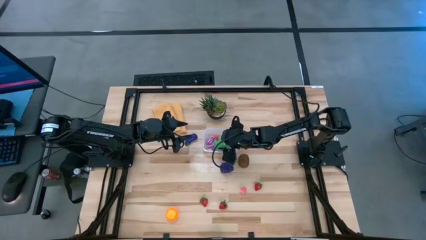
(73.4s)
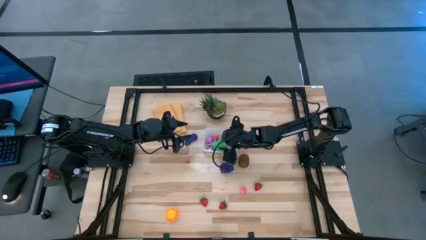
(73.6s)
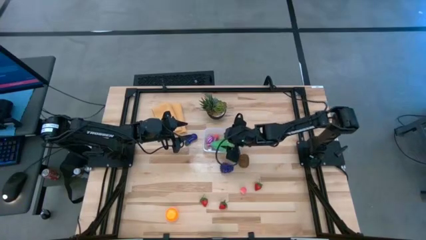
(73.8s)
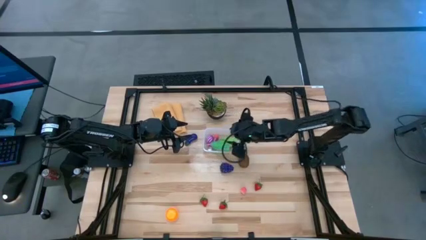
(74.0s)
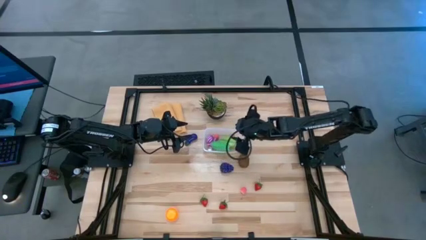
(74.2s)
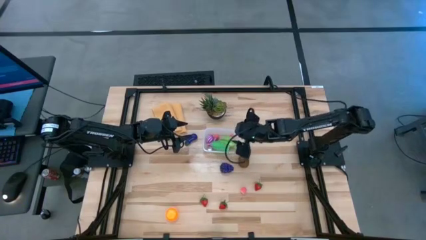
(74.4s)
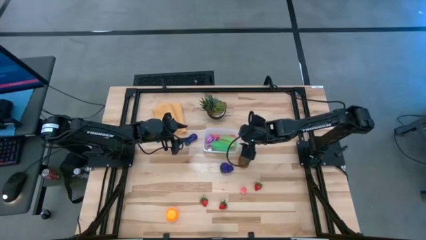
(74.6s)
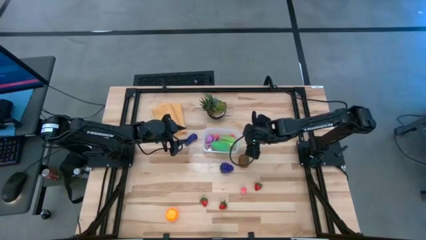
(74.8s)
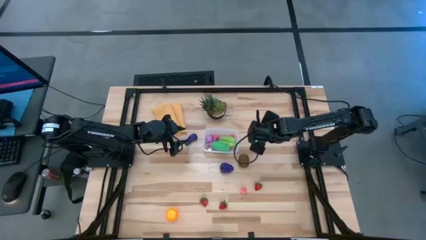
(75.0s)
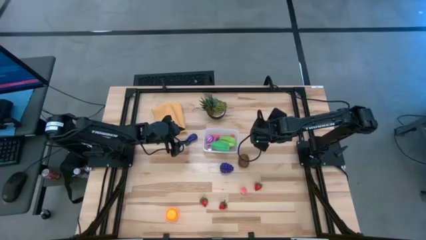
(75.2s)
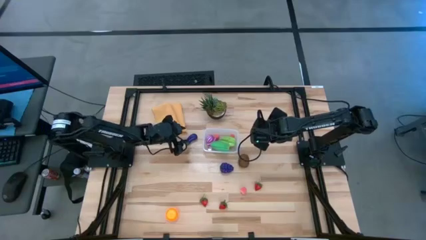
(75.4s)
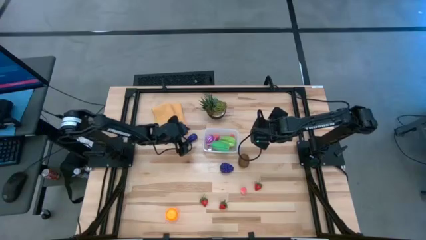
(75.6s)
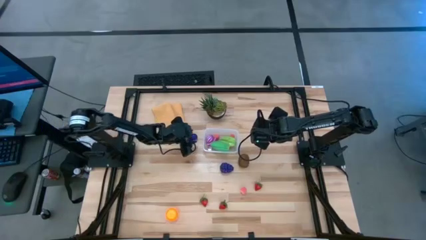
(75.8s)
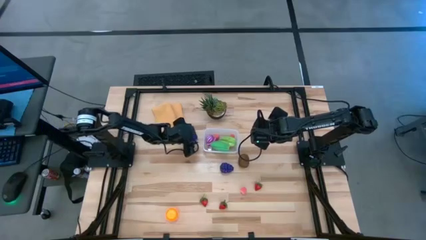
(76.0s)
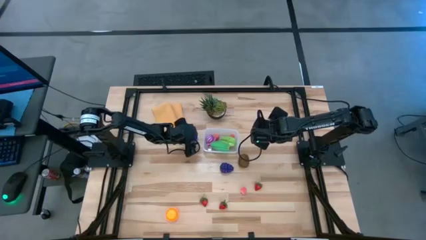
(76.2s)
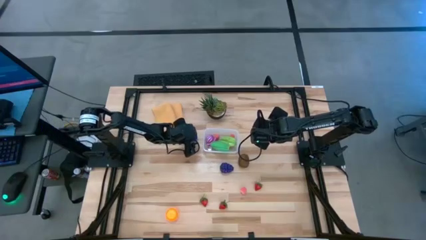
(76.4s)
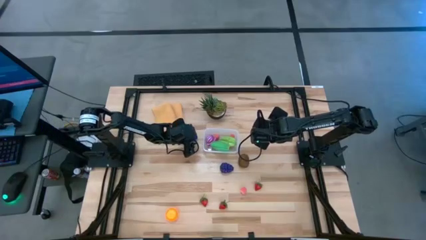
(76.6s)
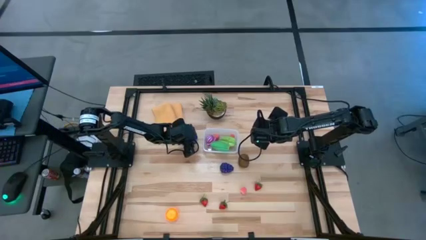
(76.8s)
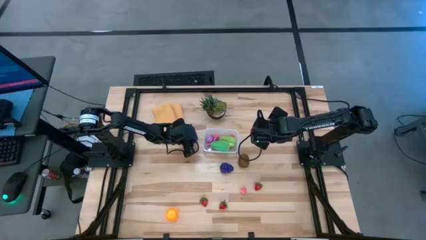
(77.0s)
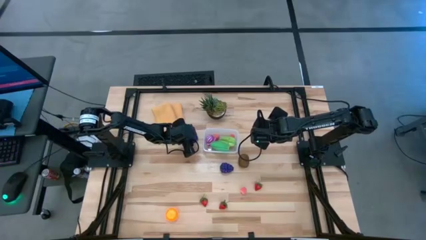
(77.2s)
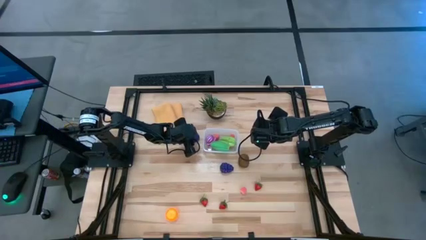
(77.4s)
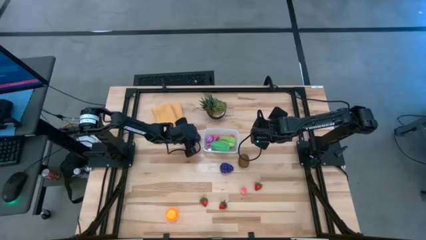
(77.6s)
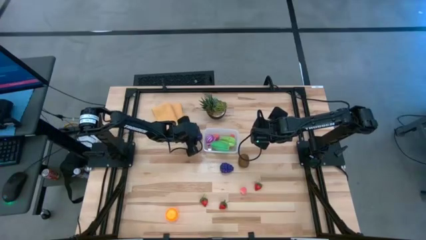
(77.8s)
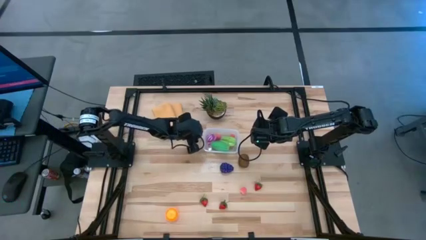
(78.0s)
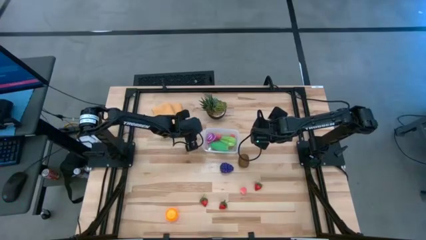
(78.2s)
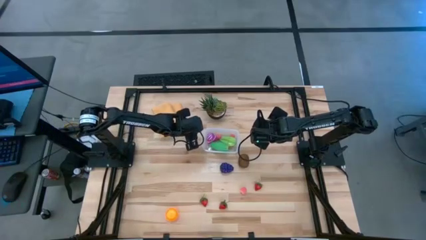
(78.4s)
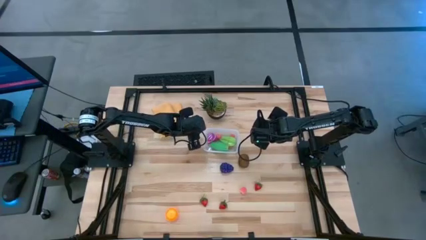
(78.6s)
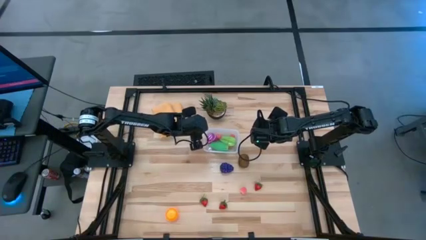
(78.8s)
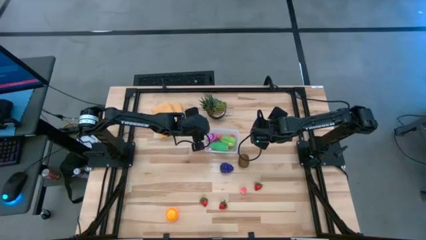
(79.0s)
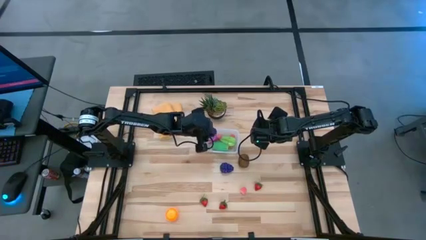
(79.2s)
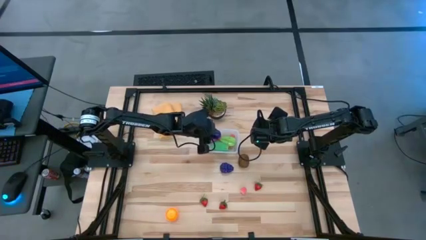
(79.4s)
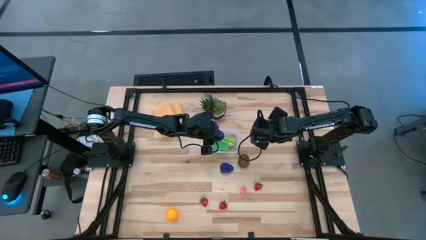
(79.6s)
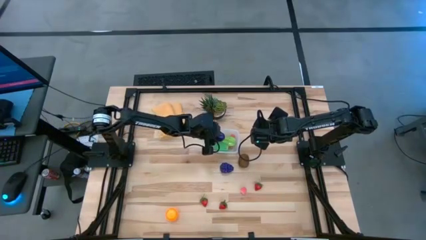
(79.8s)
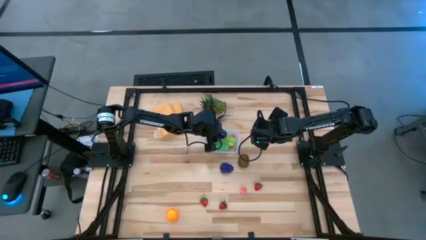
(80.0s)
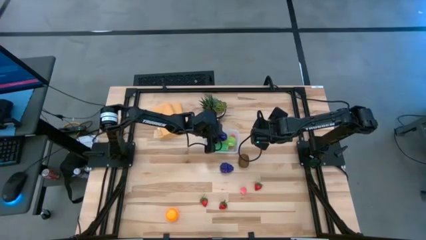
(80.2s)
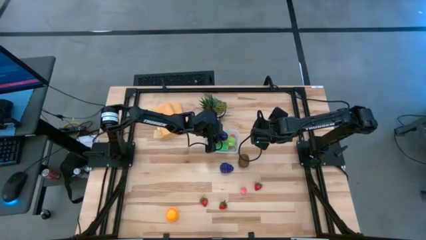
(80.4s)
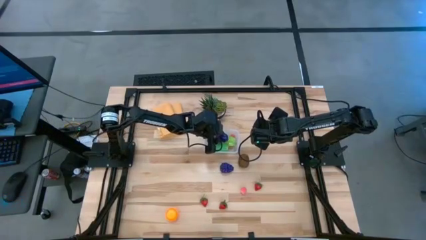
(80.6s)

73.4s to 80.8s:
Task: Pick and placing Produce into tupperware
Put the purple eggplant into the transparent container

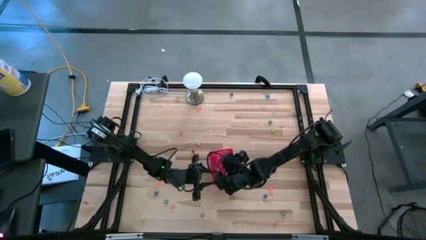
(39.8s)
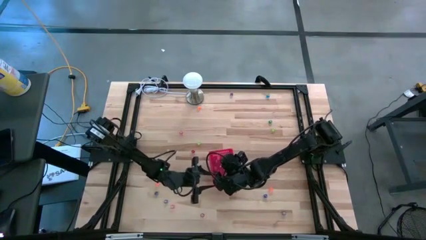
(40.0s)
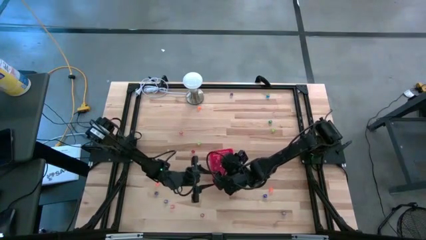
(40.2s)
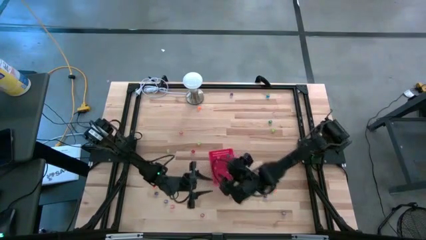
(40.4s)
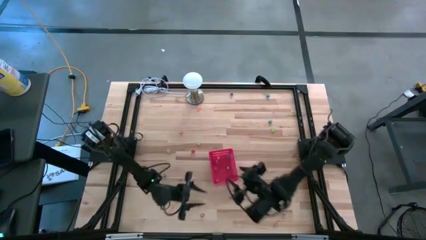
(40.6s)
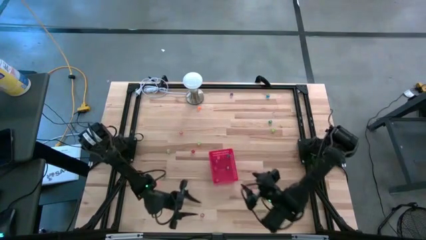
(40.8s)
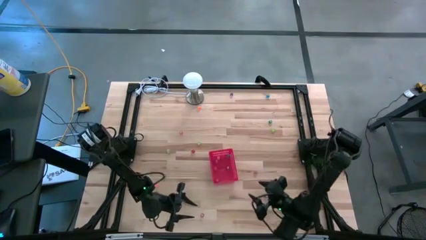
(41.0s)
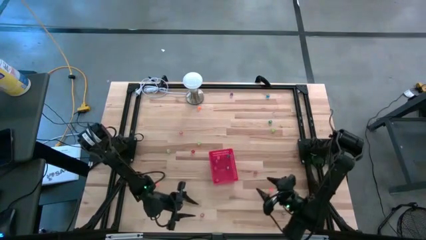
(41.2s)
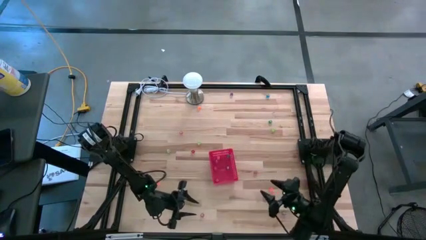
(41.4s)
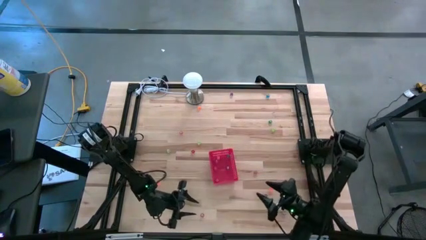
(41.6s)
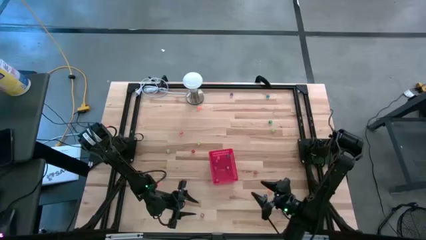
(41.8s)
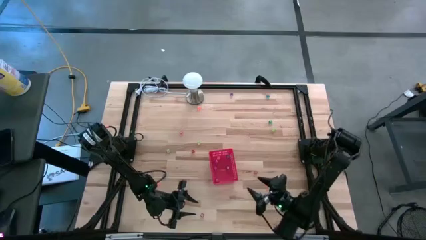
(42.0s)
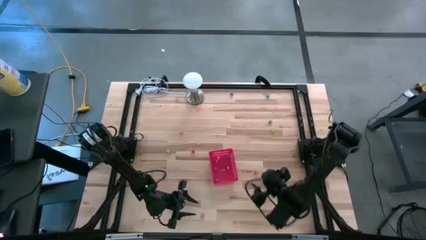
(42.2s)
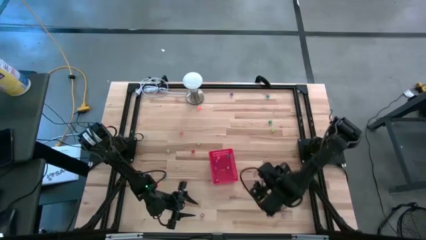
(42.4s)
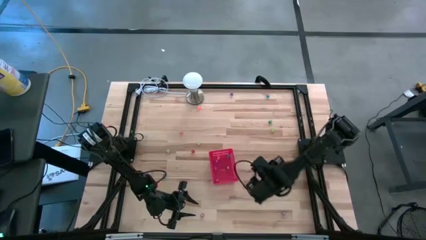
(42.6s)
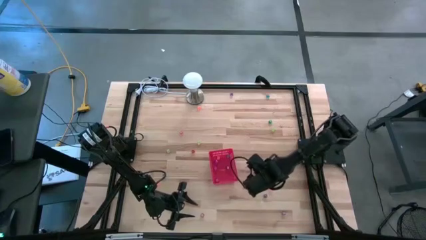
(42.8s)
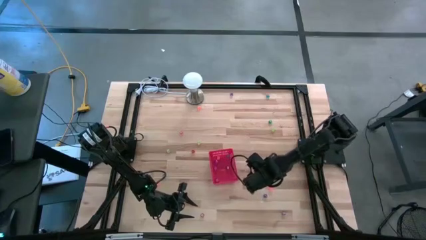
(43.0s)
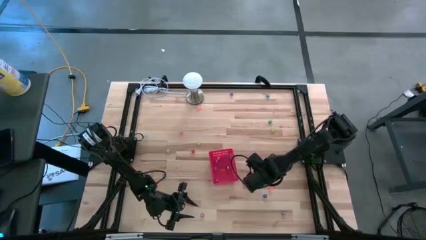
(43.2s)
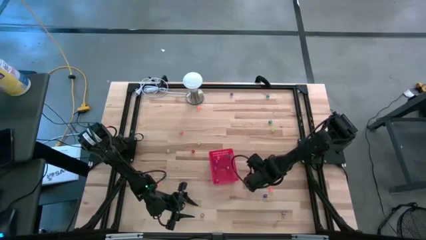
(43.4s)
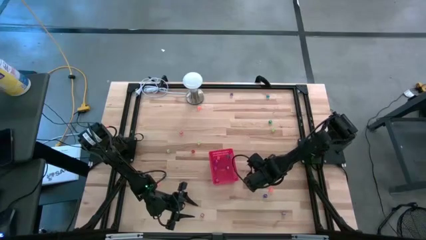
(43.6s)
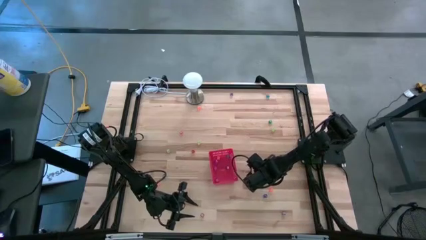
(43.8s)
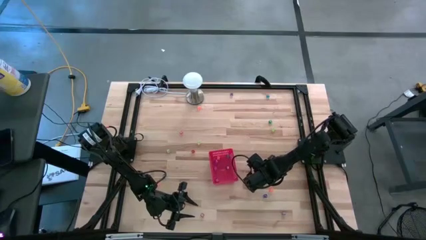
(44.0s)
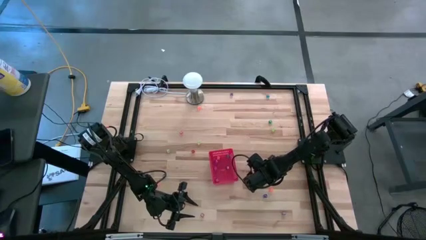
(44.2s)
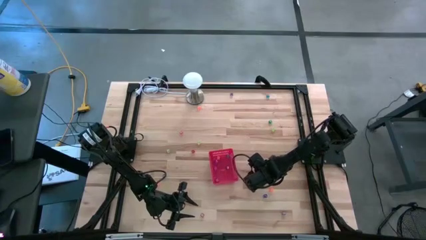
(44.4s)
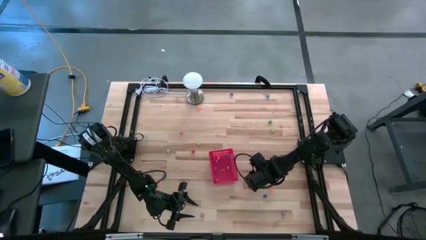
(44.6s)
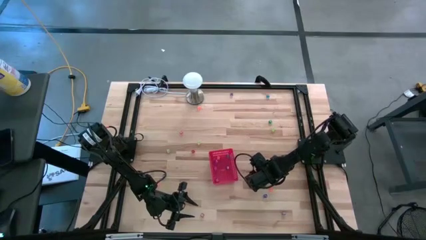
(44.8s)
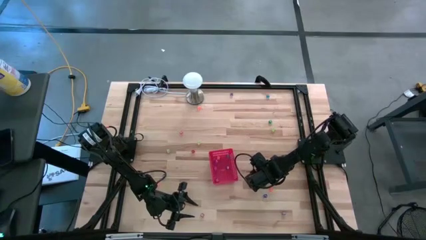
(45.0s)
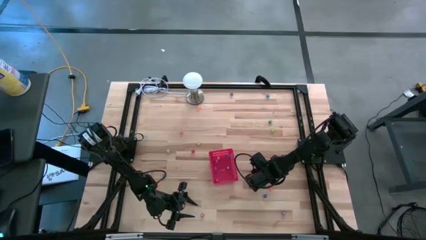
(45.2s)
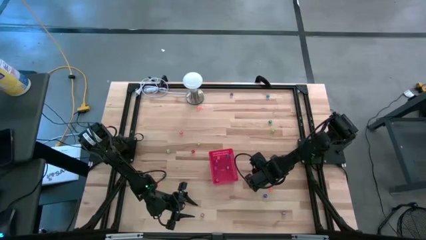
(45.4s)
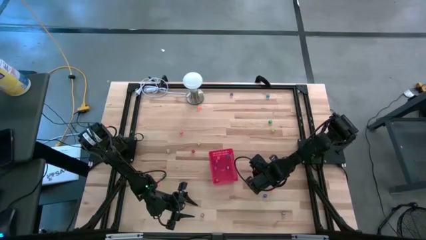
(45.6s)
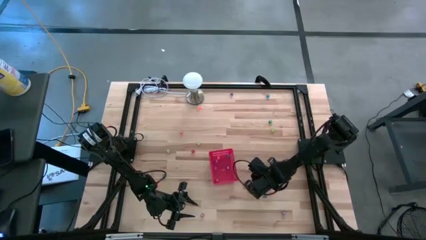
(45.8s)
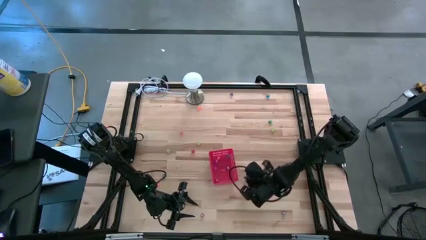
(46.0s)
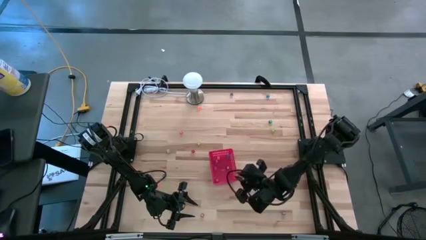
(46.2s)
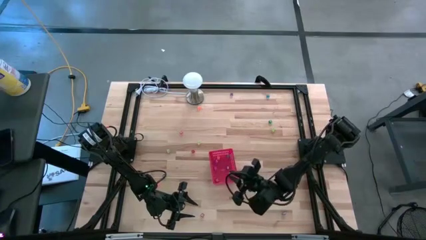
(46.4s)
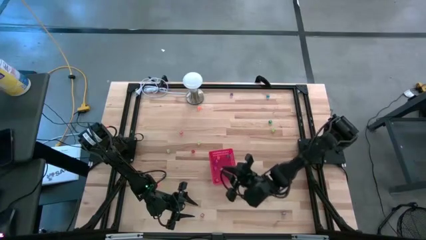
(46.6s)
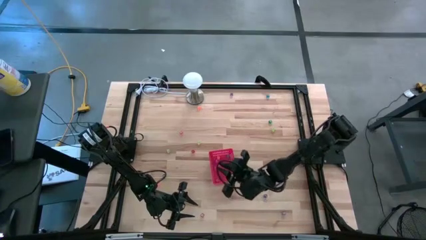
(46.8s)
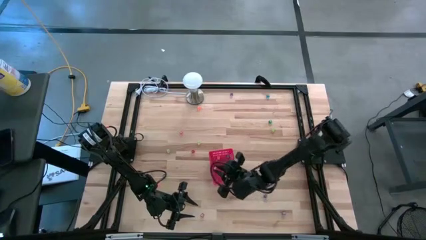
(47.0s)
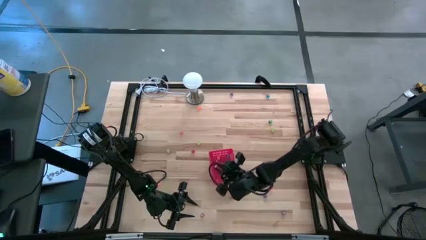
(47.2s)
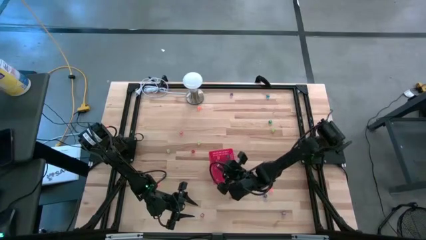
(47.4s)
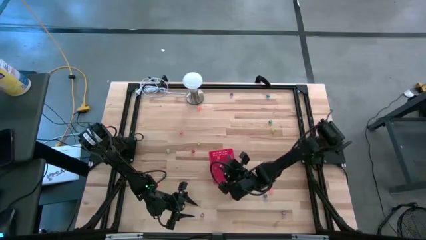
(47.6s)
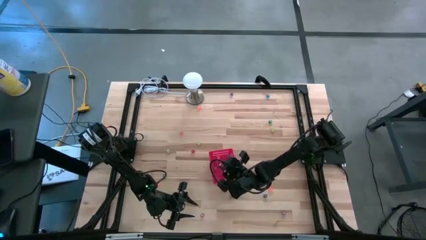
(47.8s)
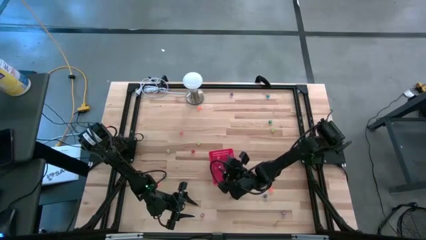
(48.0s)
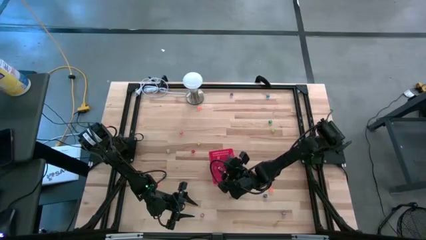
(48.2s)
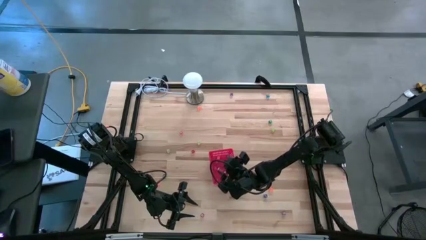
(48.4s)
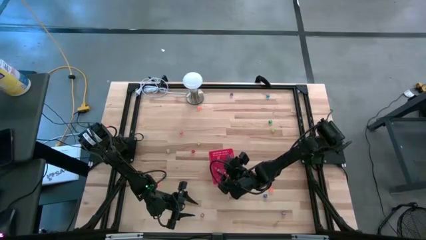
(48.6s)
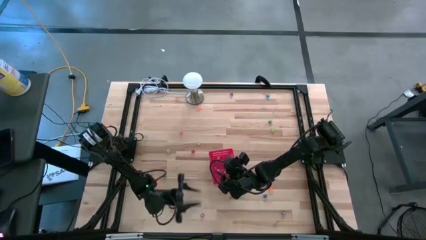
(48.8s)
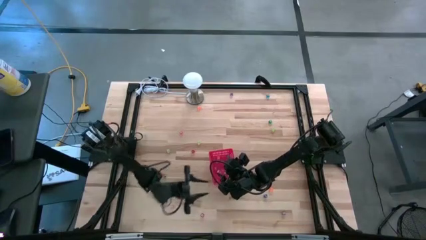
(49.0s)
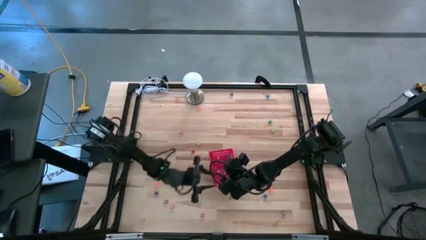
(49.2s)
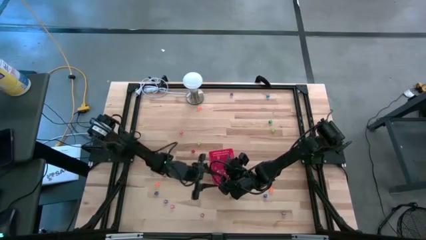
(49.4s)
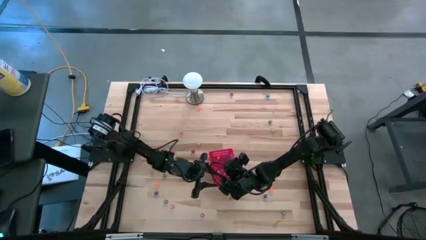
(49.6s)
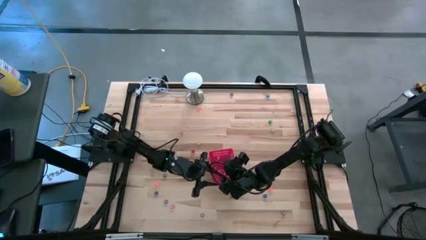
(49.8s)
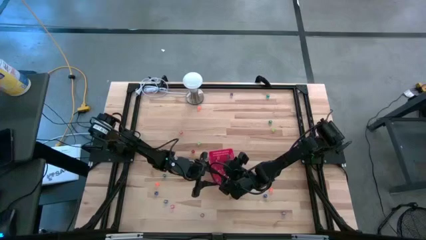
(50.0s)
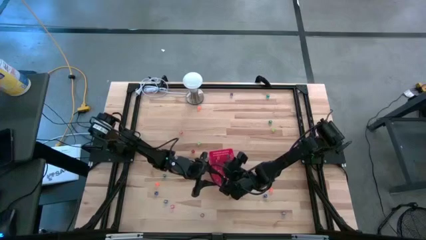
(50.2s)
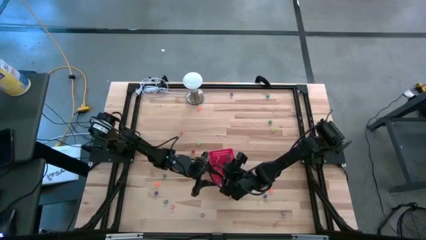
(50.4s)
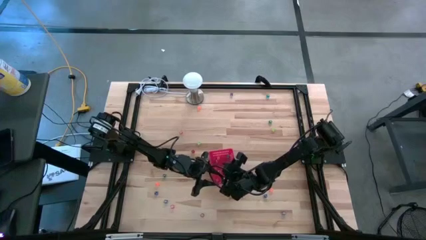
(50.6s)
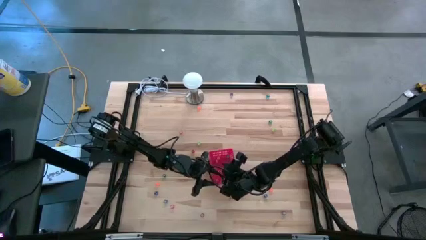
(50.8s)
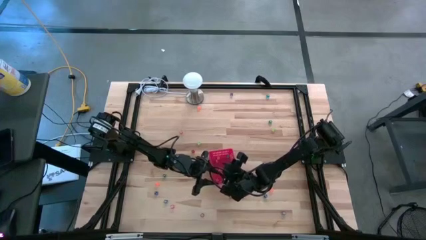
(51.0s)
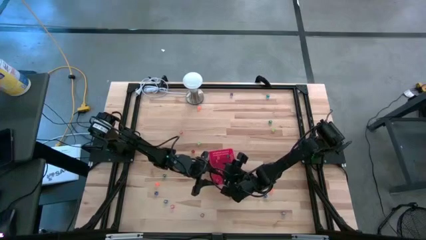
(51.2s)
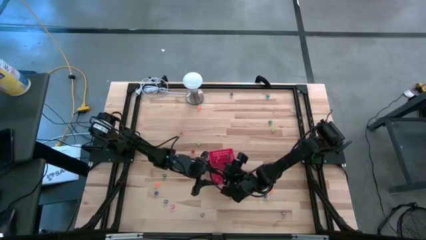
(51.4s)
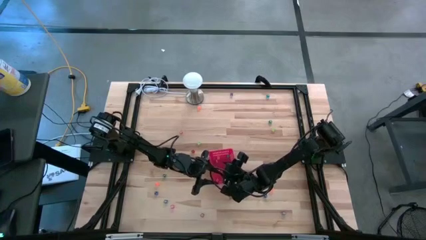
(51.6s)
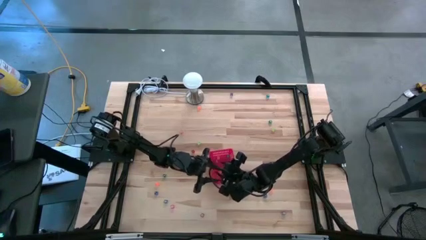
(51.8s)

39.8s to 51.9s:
Task: Pick & Place Dice
Put the red die into the red basket
